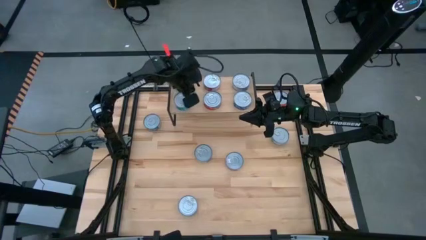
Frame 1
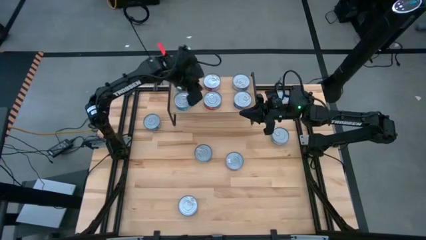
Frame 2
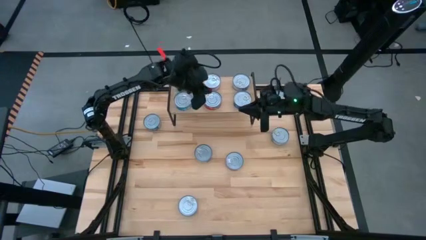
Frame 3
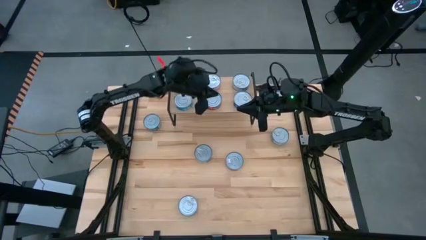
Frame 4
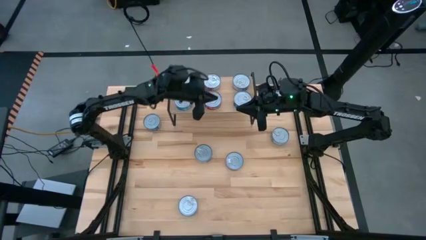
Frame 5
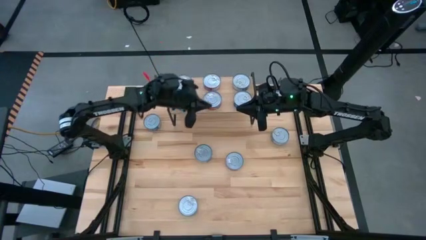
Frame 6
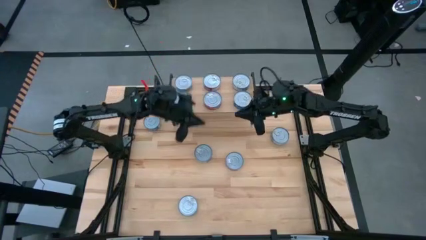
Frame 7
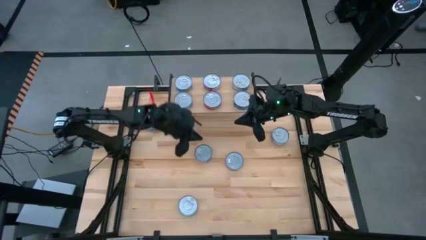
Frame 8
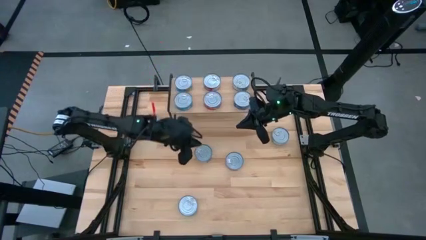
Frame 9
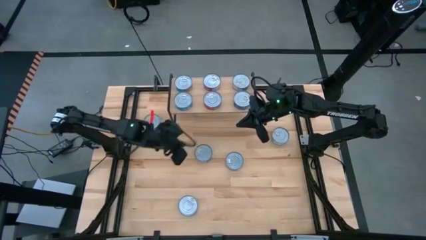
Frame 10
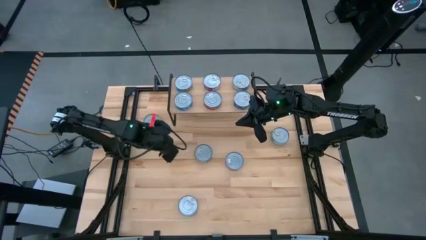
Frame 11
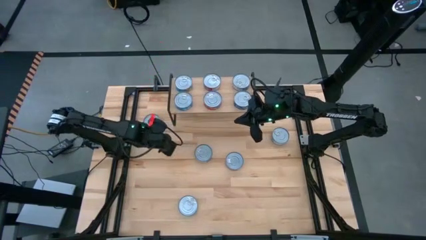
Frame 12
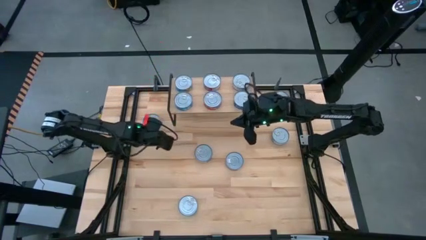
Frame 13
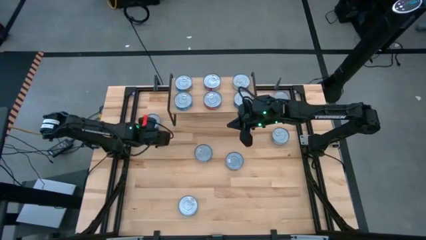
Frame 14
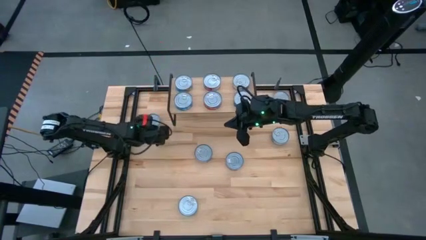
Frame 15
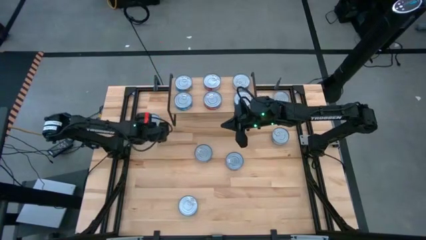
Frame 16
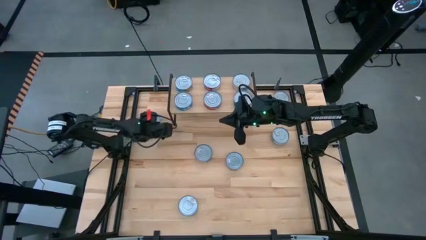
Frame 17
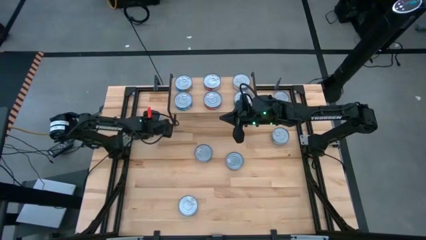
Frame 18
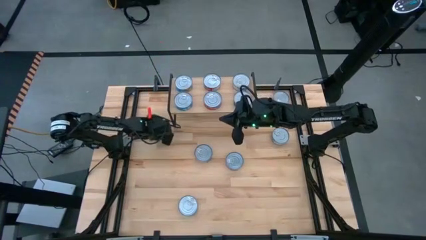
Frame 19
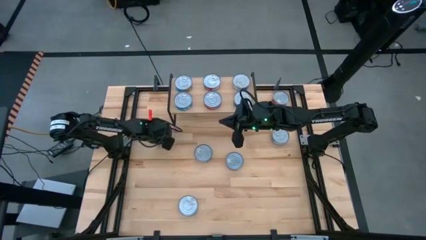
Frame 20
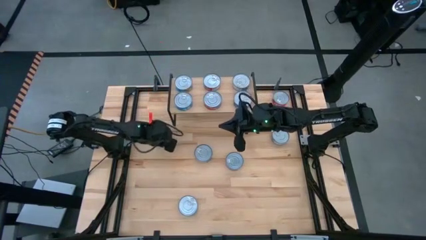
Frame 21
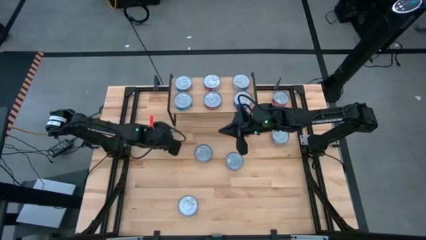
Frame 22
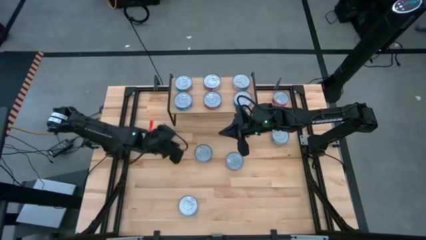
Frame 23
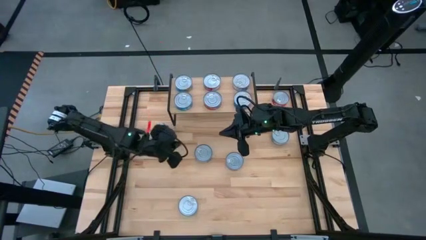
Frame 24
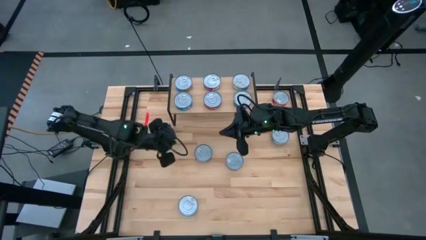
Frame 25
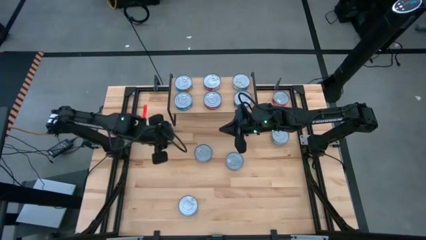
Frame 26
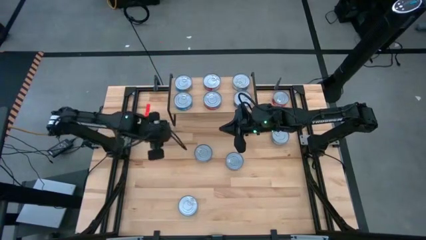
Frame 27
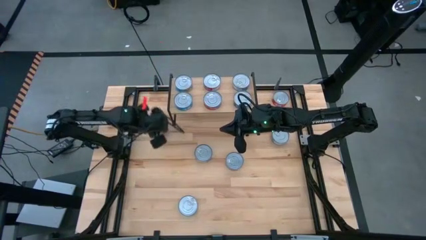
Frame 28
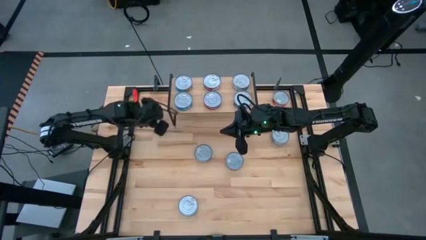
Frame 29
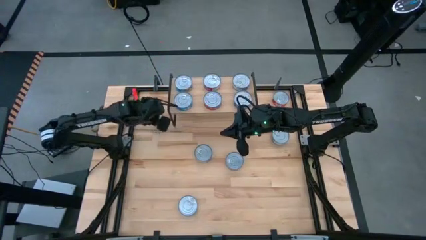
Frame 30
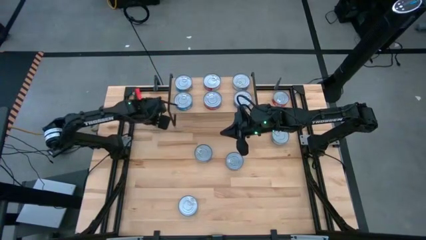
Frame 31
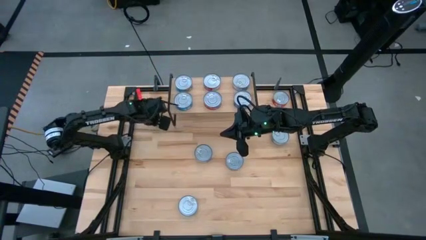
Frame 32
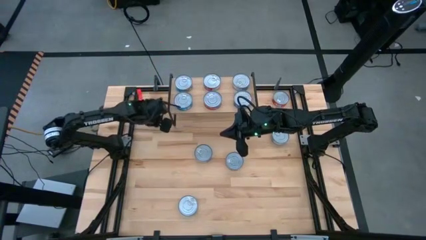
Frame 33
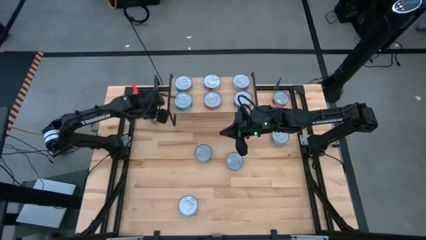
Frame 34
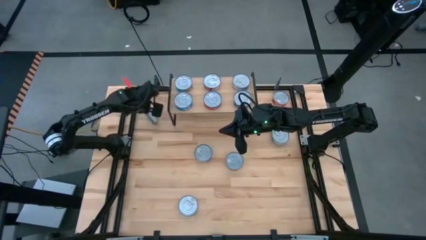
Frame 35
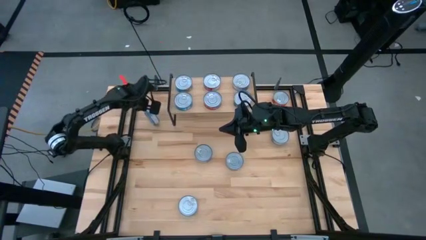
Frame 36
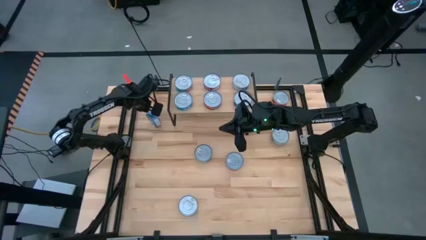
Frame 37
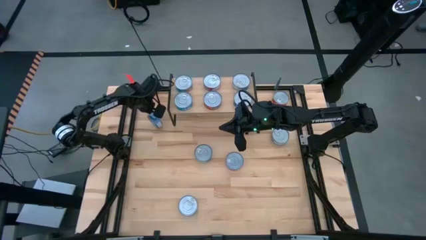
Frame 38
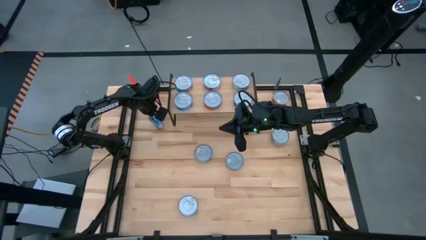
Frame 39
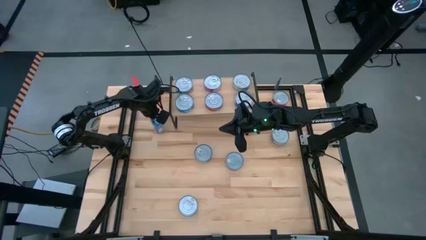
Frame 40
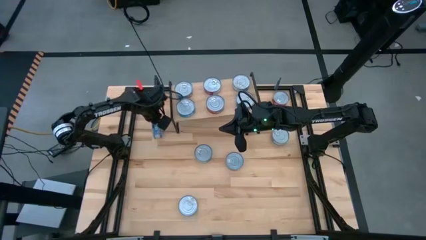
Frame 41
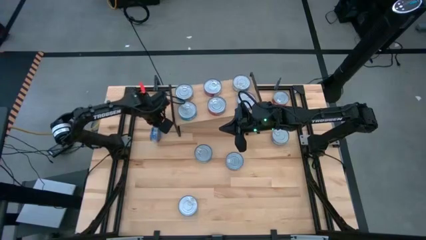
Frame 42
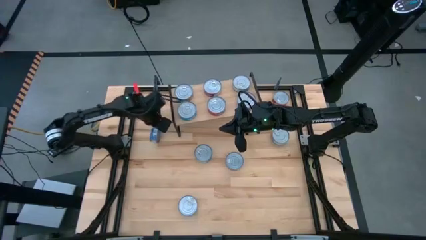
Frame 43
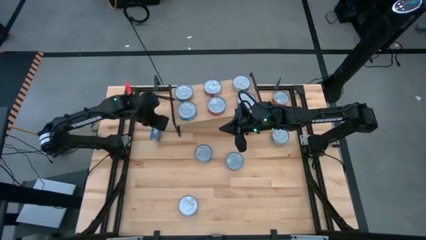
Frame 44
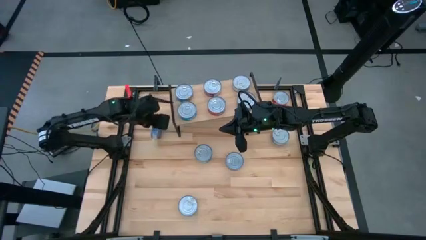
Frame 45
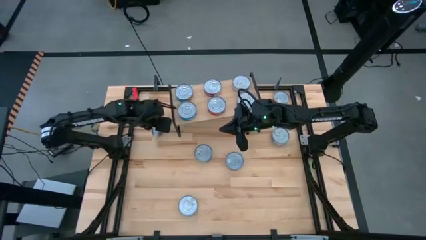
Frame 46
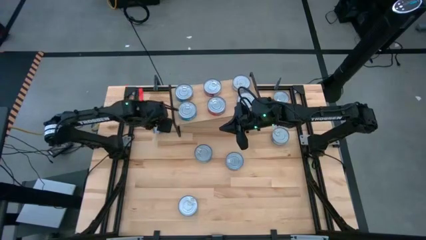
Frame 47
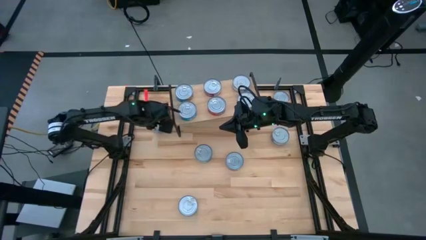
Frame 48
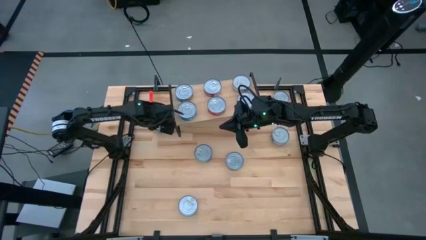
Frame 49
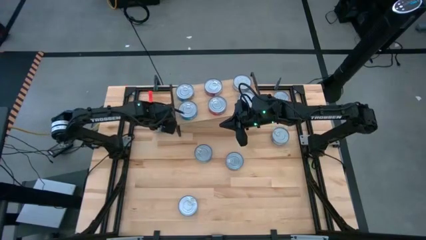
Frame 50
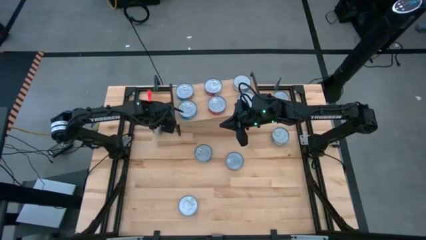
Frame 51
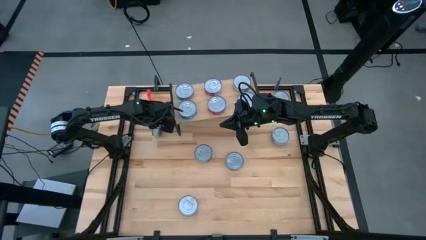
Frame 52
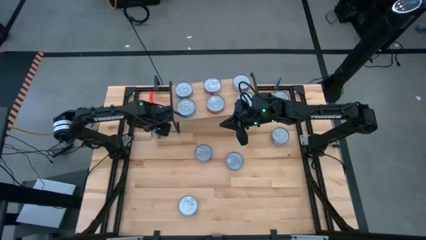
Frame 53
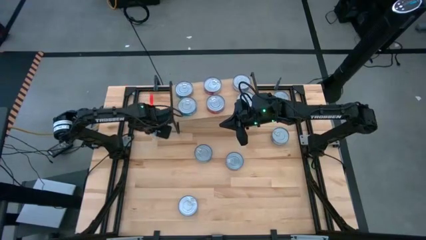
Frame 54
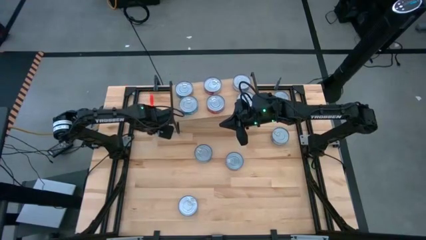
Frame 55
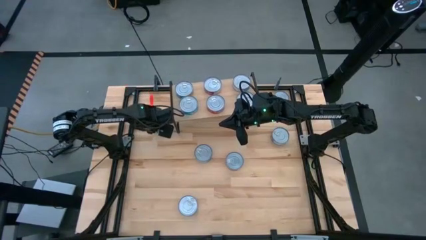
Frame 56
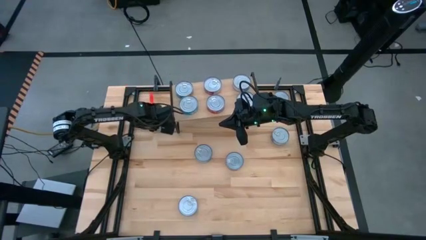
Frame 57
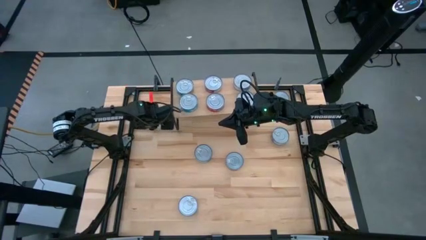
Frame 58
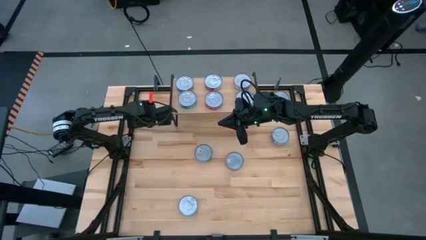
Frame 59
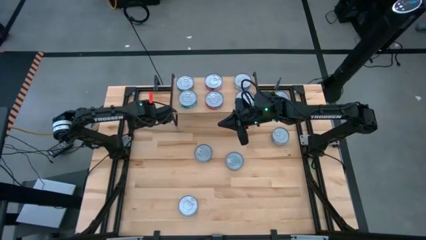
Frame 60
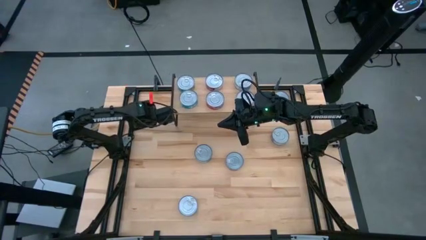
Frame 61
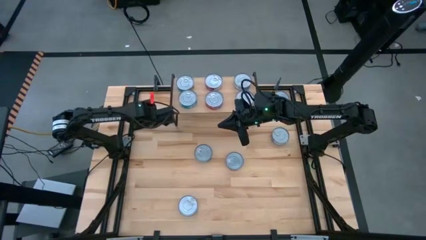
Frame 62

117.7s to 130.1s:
Task: Stack canned seafood by type on shelf
Stack the top blue tuna can on top of the other blue tuna can on the shelf

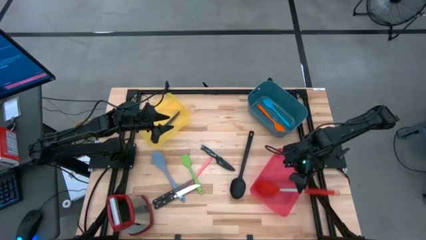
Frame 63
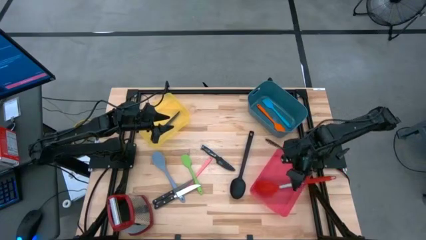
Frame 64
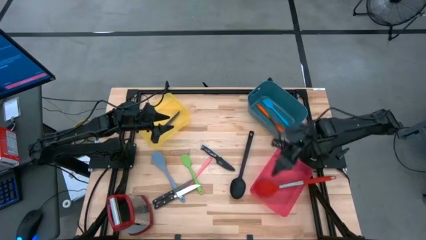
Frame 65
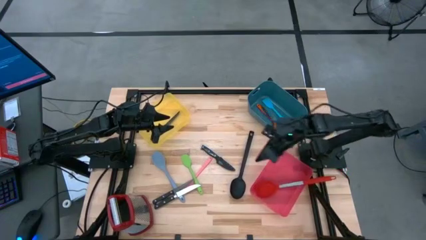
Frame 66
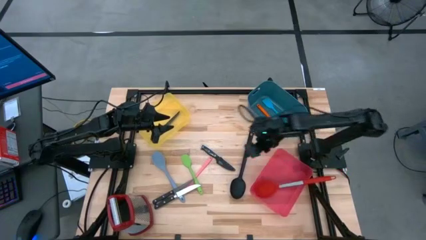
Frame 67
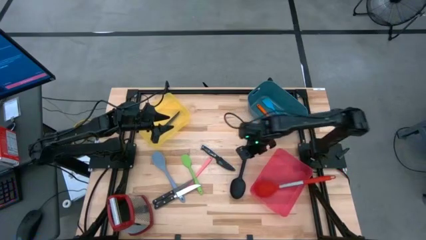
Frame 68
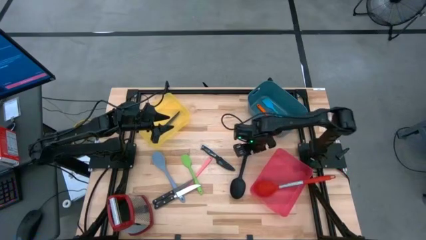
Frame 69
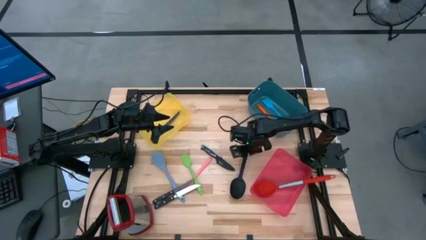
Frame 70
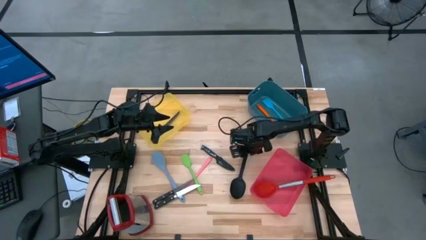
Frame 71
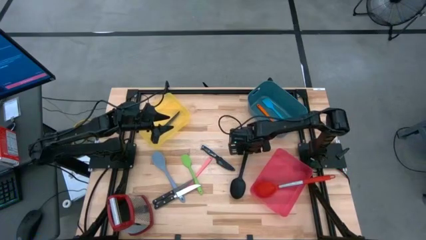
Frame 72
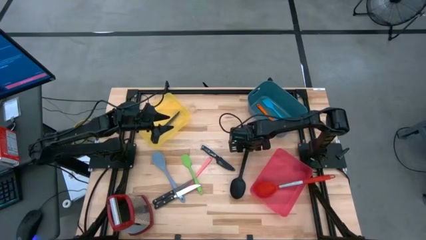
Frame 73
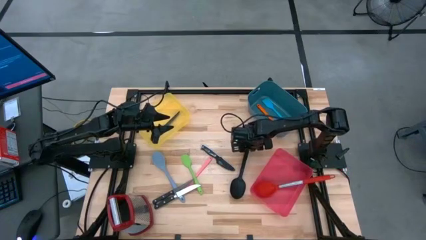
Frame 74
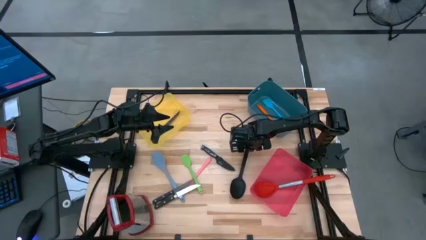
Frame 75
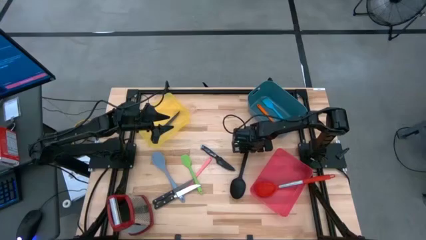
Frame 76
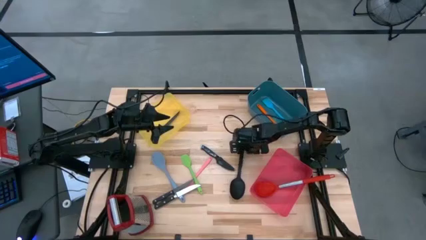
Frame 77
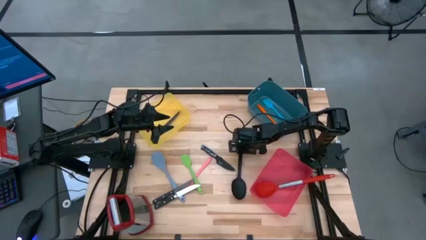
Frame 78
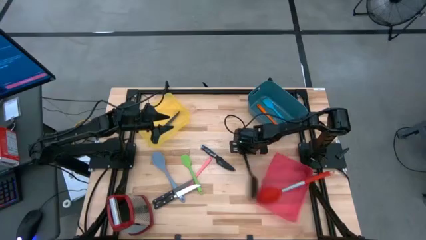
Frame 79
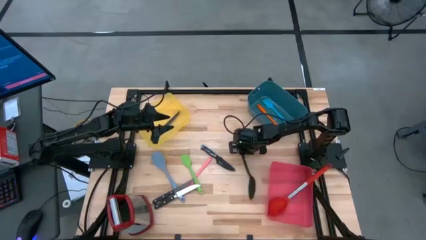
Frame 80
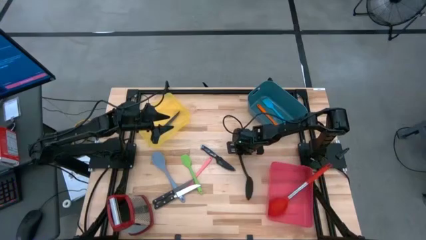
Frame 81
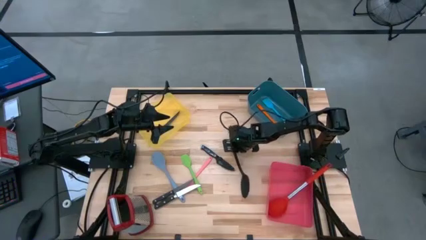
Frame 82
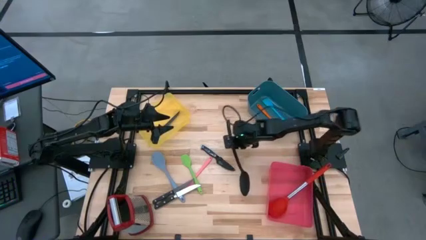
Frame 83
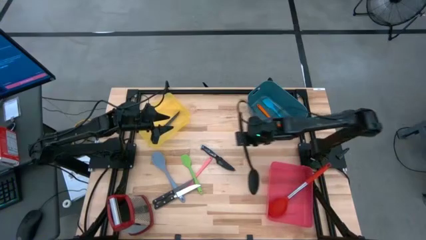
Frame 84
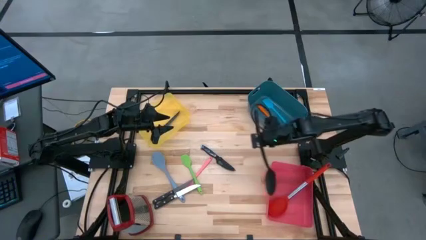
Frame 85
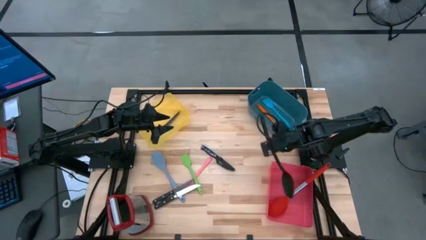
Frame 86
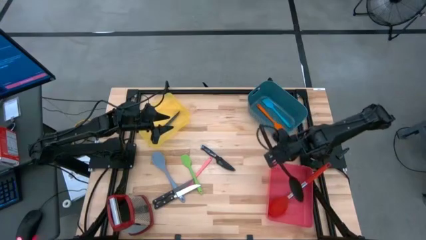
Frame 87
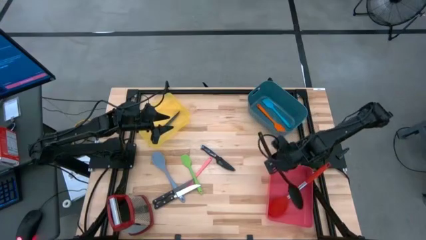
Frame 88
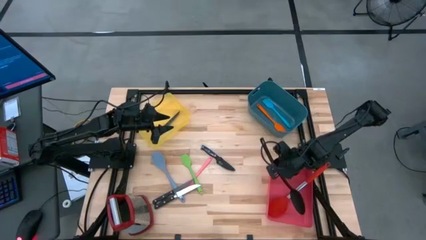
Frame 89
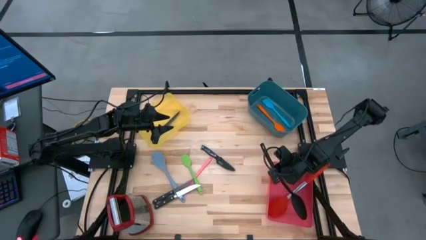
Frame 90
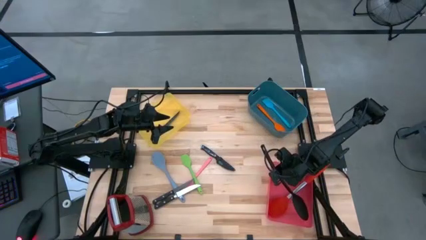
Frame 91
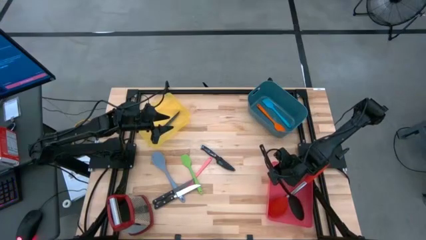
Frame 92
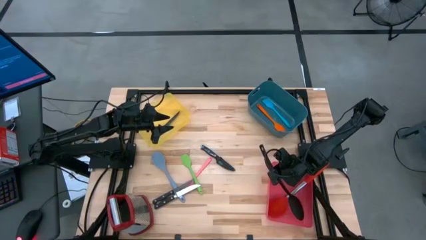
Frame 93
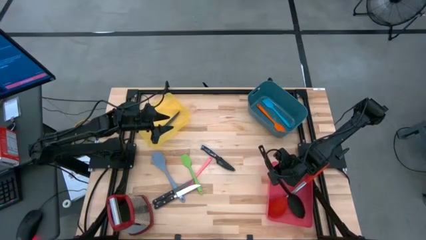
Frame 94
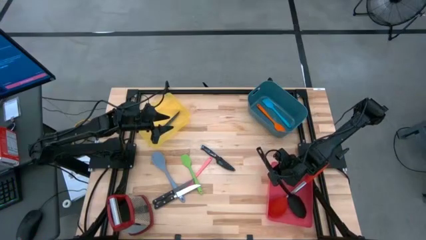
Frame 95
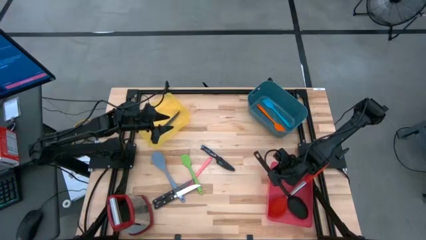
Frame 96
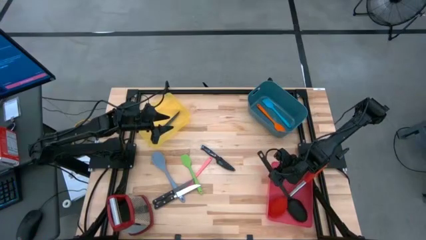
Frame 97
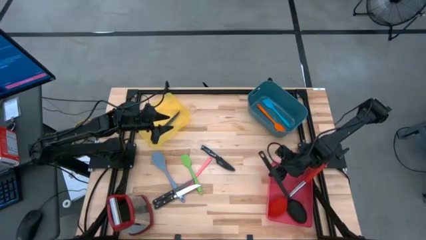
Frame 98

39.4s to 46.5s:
Task: Pick & Place Kitchen Items
Put the black serving spoon into the red bin
